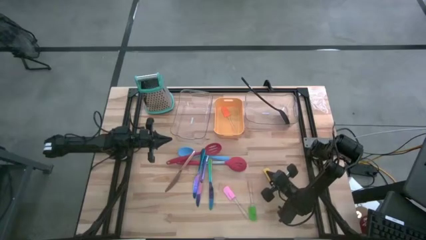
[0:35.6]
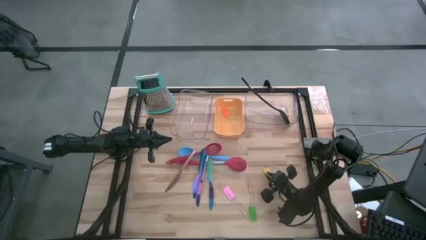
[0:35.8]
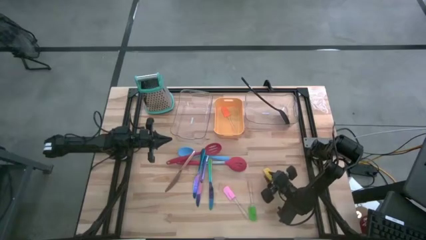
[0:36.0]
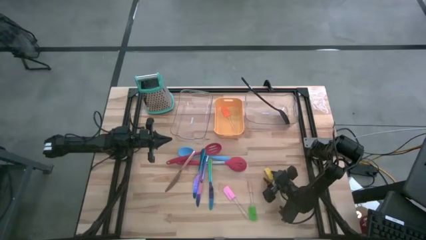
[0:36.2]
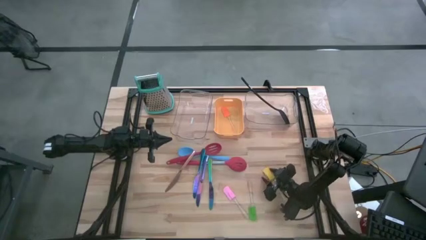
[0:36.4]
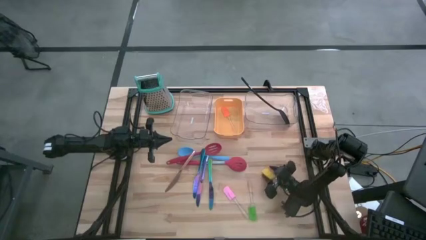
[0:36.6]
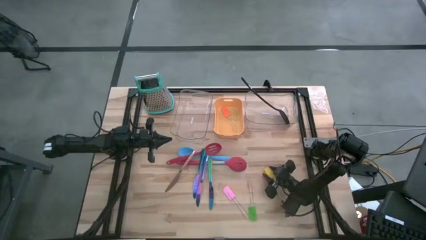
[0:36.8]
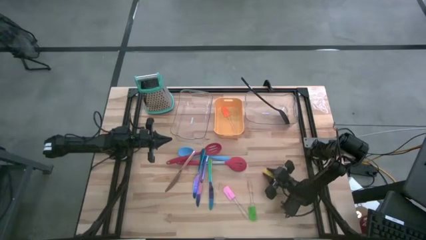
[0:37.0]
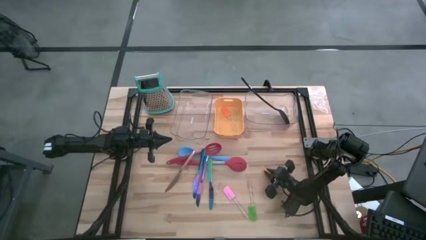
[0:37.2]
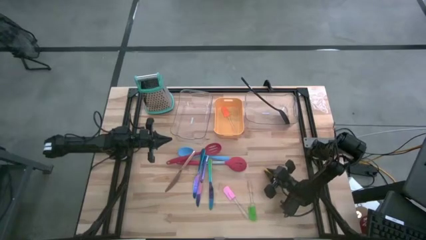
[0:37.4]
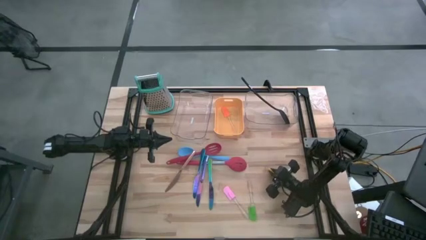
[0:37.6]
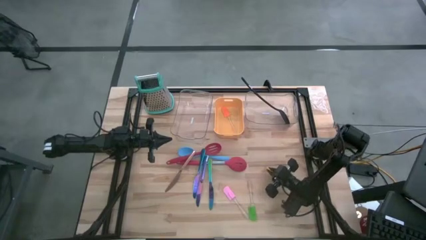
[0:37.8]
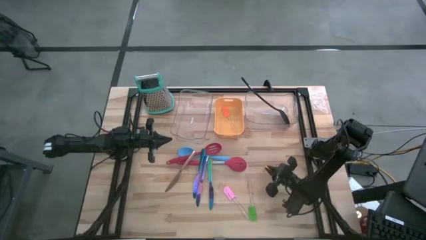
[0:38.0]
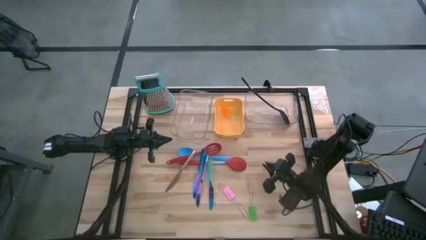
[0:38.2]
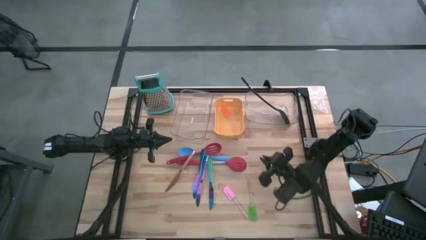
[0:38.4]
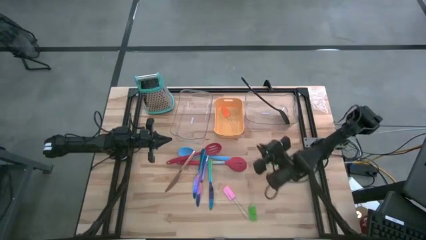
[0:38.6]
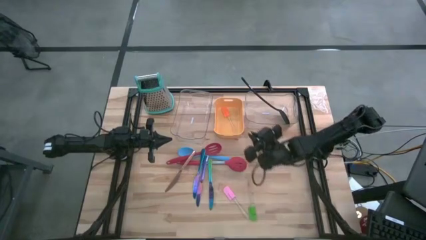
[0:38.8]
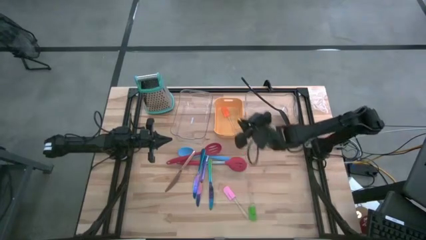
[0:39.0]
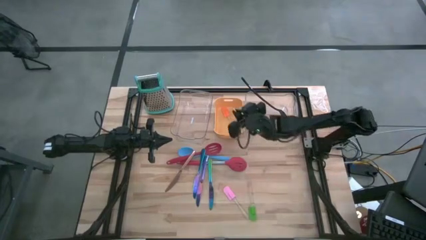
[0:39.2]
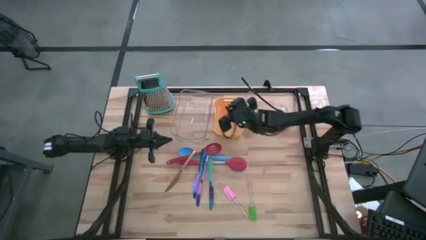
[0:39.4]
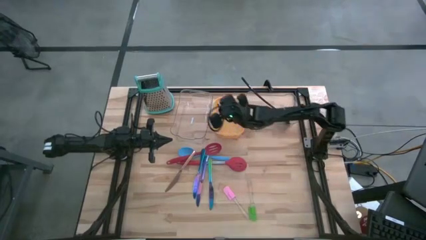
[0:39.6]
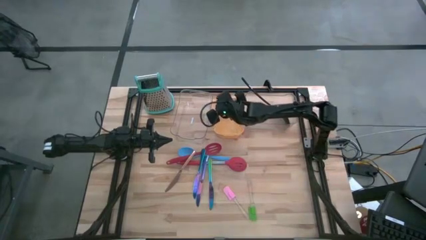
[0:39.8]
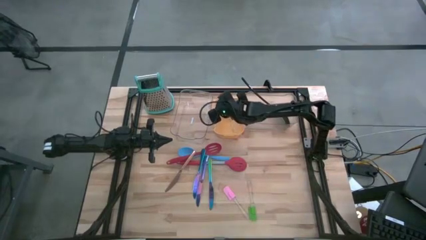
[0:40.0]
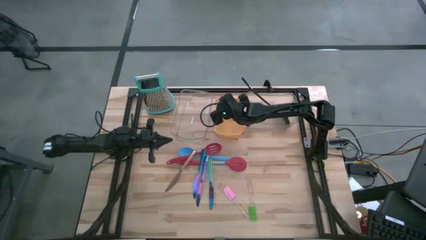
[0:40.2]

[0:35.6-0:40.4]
Task: Pick & Place Kitchen Items
Put the yellow spatula into the orange bin

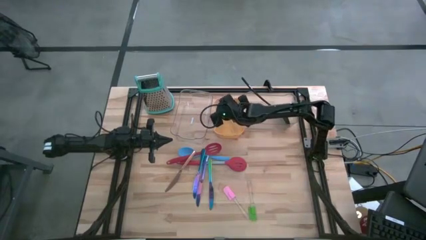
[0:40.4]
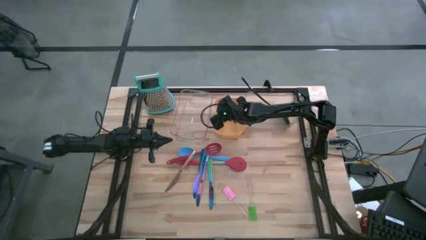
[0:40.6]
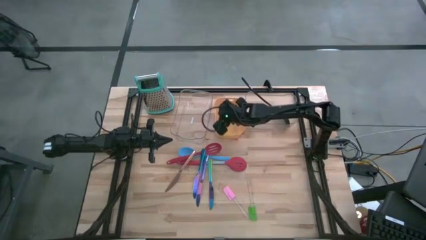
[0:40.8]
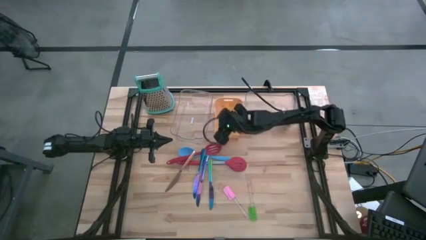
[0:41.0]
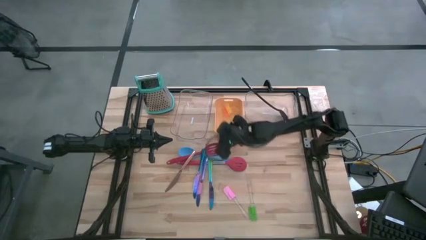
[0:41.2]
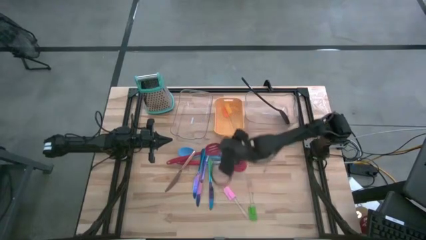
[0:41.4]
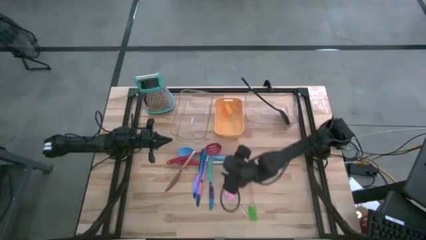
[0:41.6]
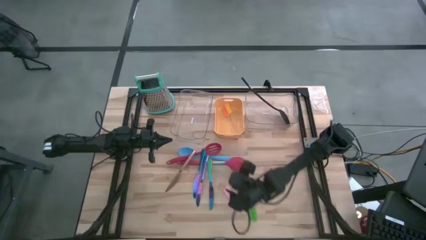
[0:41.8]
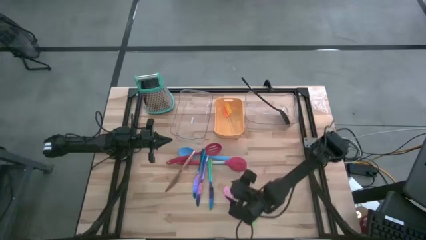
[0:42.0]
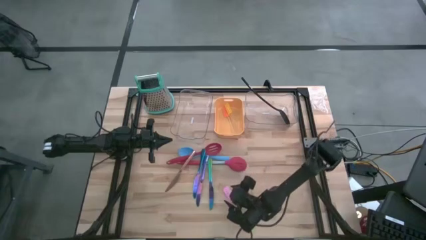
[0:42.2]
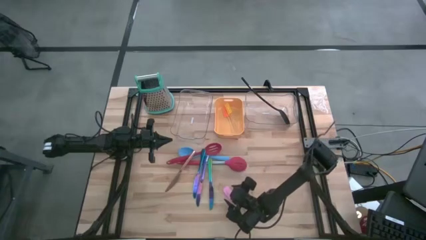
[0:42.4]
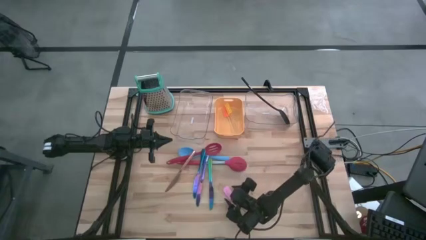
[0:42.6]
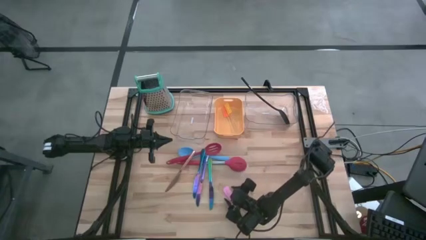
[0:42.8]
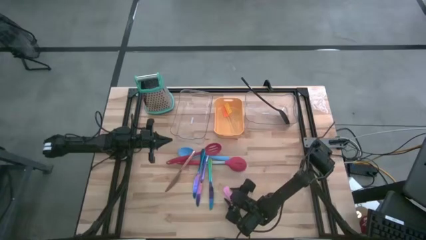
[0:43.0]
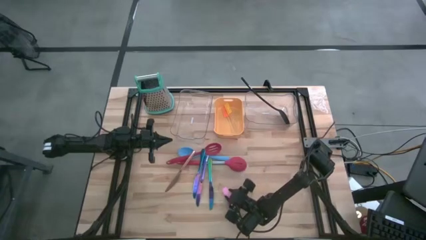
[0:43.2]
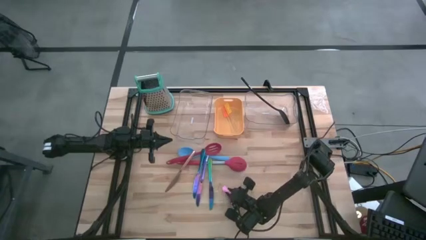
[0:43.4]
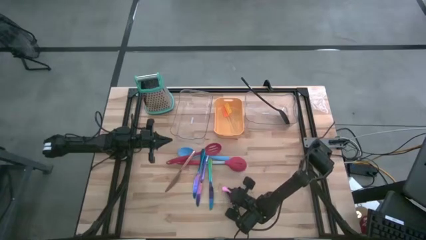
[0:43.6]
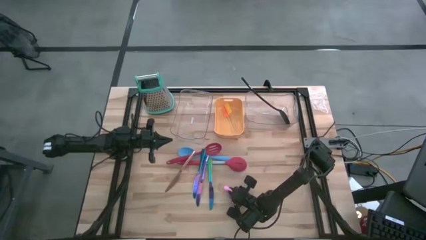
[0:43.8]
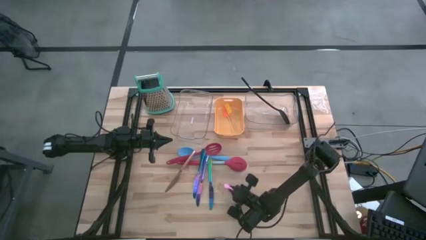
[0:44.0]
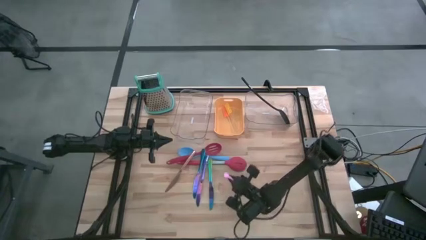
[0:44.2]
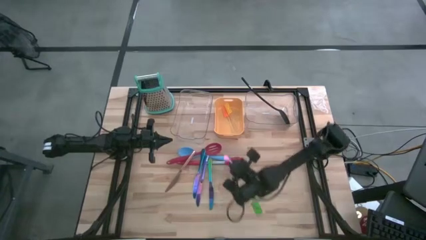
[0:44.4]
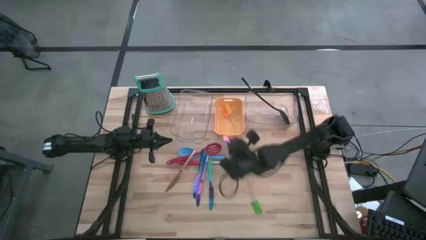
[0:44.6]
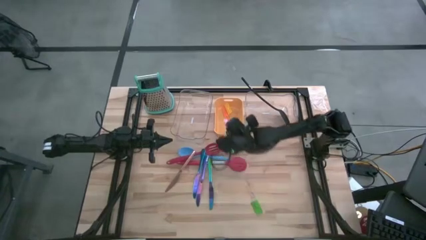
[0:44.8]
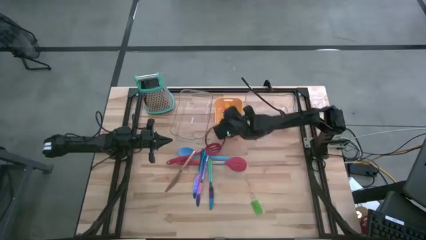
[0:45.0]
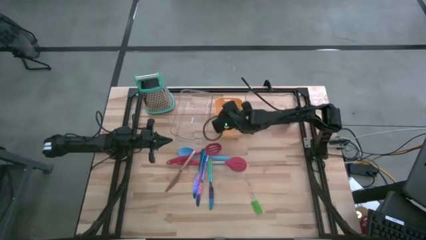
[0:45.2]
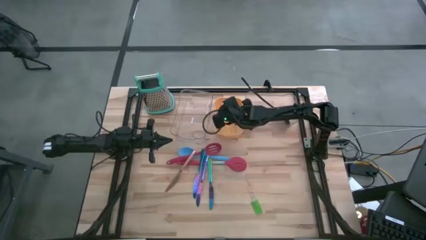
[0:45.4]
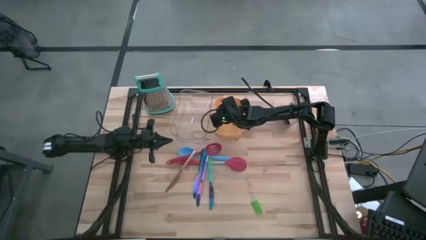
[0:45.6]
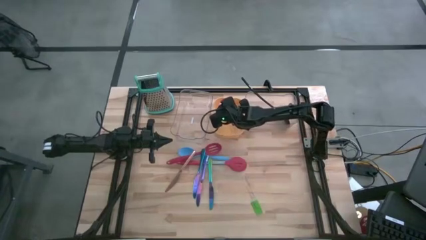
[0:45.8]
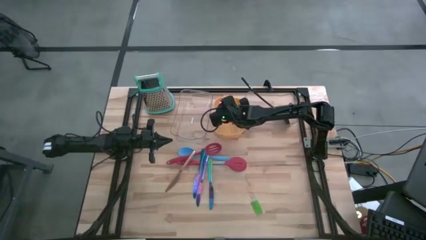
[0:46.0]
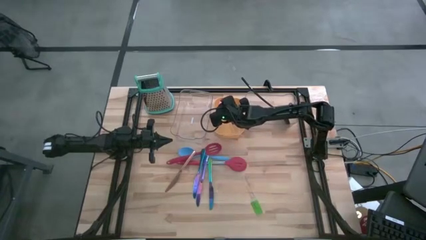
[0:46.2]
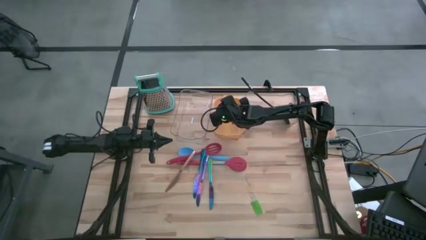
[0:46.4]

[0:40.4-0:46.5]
Put the pink spatula into the orange bin

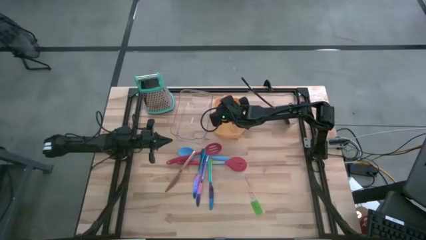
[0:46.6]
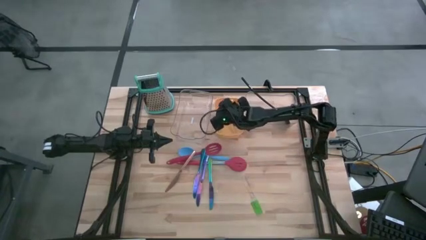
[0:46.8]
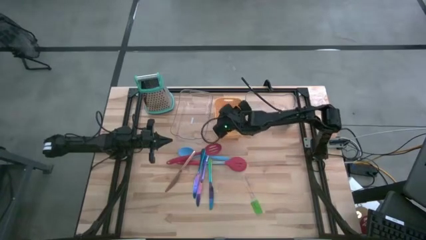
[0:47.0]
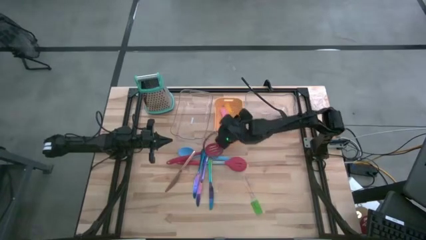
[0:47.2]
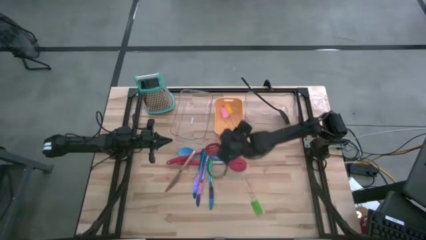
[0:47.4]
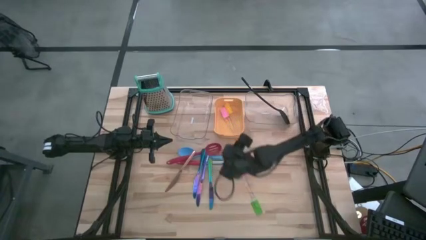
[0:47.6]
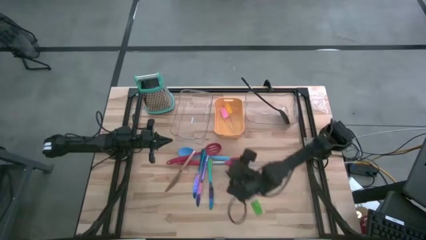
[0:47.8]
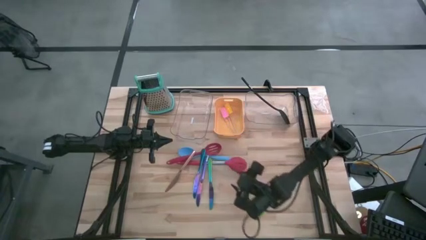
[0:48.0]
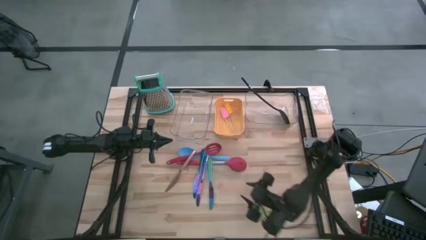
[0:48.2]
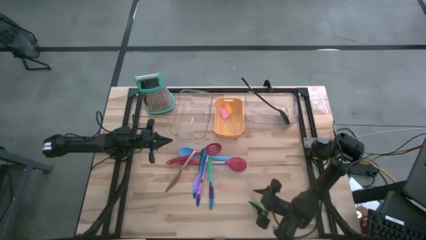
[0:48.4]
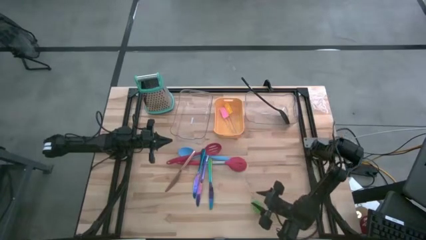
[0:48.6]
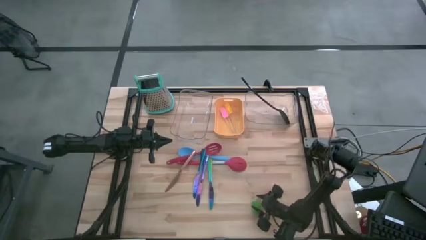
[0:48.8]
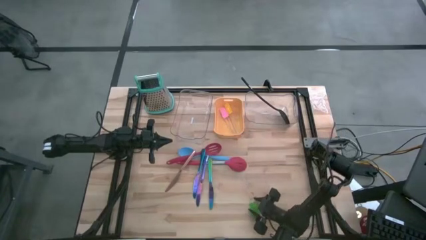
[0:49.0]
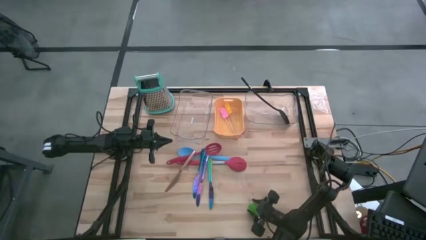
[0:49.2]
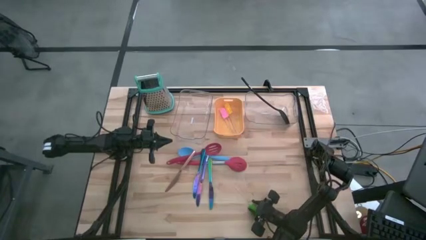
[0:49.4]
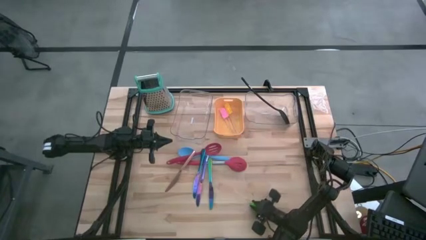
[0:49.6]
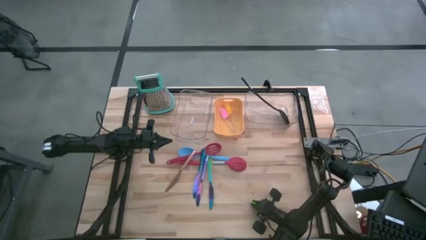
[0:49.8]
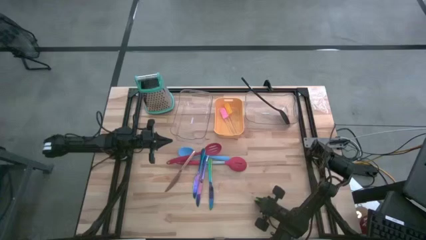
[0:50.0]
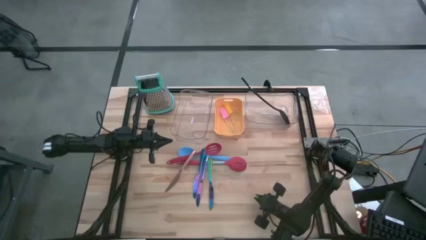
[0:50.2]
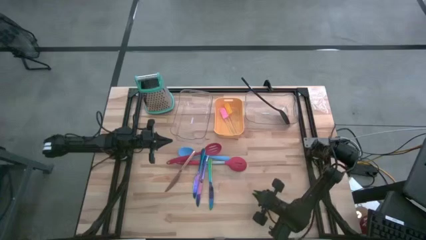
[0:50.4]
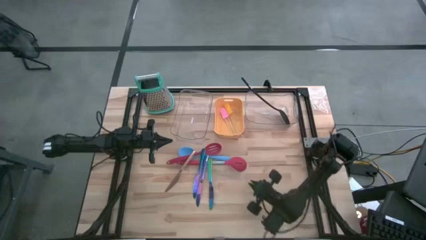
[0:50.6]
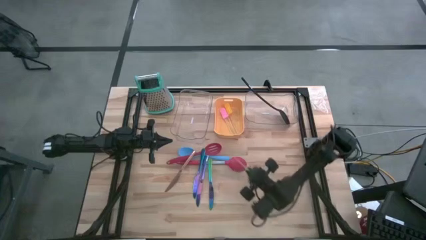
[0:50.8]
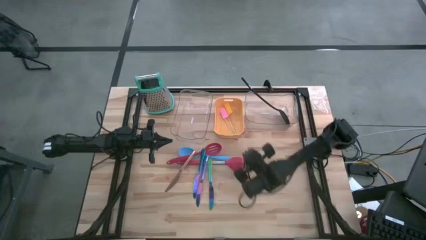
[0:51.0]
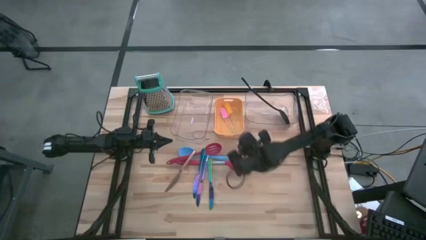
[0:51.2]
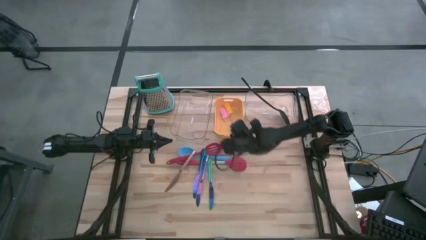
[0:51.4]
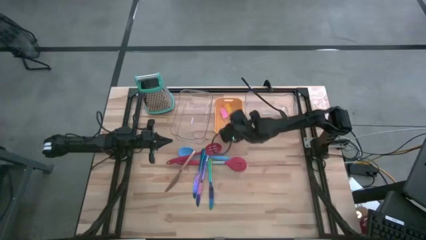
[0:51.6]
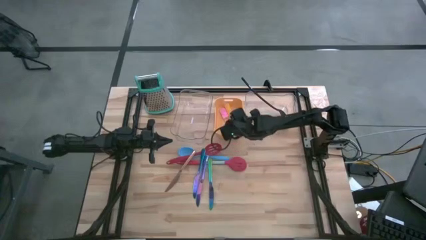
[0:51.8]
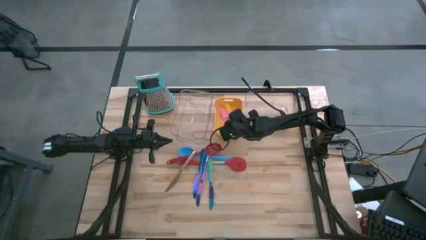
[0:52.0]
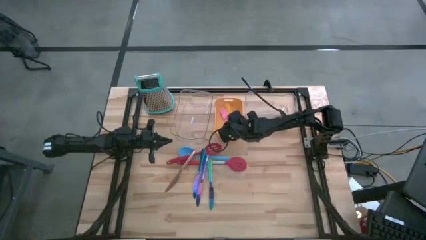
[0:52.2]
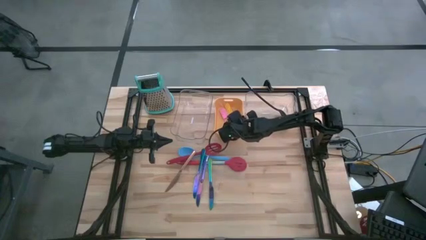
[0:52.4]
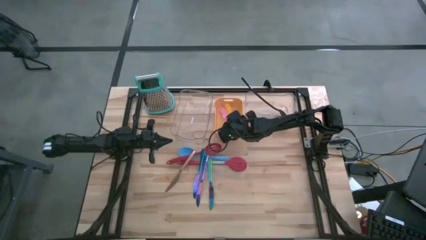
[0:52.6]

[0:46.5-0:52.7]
Put the green spatula into the orange bin
